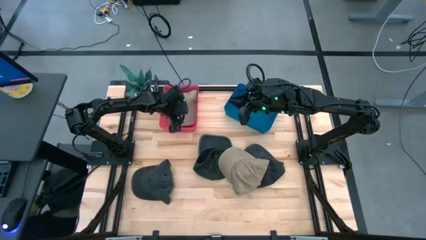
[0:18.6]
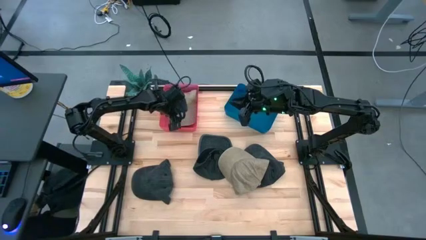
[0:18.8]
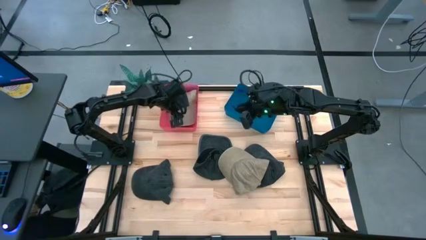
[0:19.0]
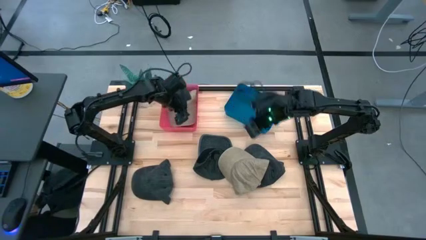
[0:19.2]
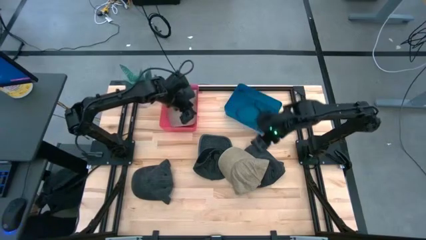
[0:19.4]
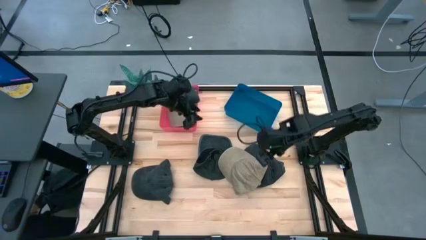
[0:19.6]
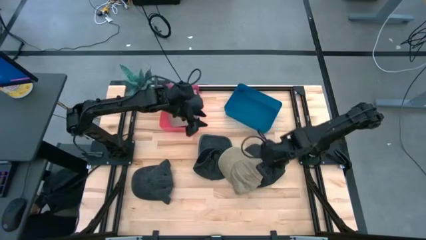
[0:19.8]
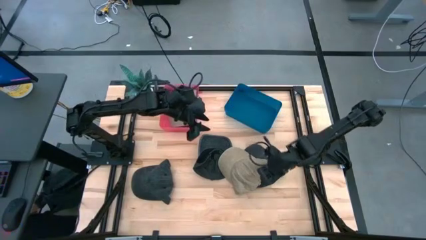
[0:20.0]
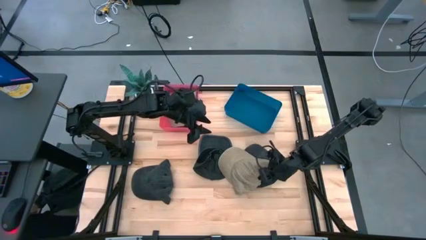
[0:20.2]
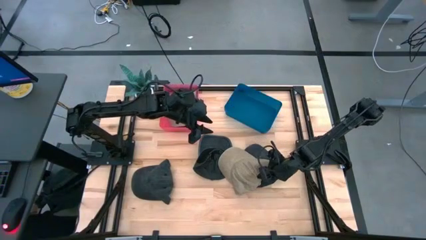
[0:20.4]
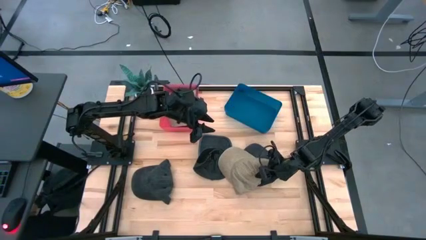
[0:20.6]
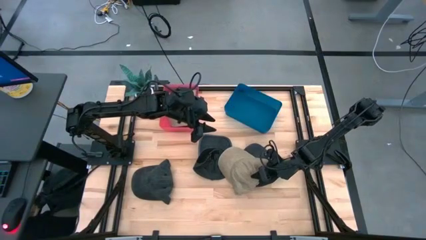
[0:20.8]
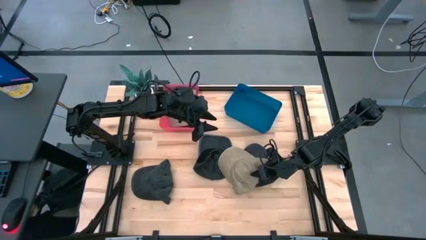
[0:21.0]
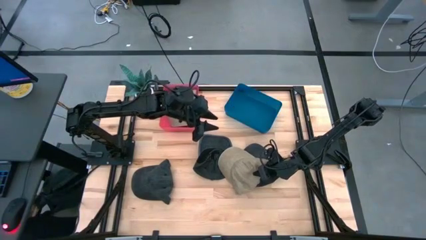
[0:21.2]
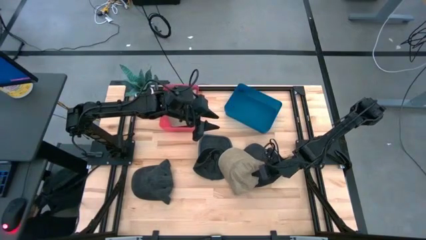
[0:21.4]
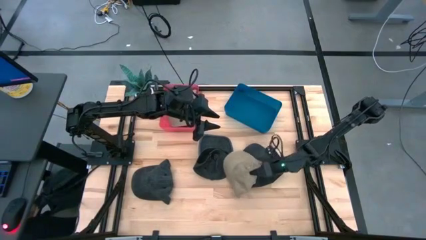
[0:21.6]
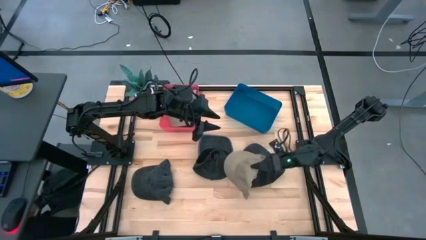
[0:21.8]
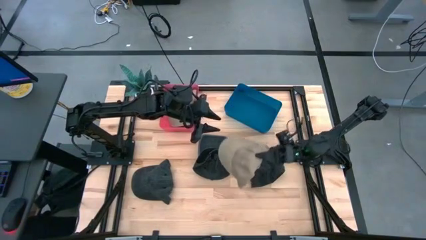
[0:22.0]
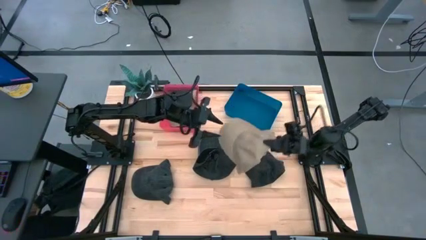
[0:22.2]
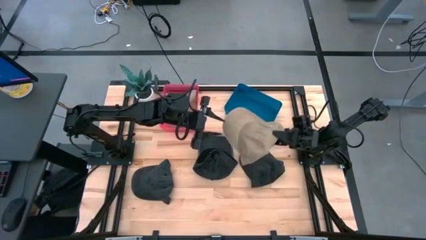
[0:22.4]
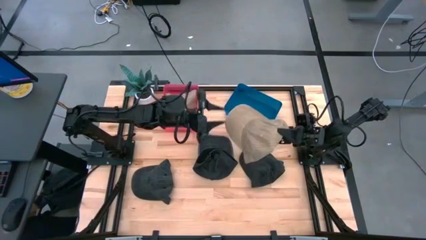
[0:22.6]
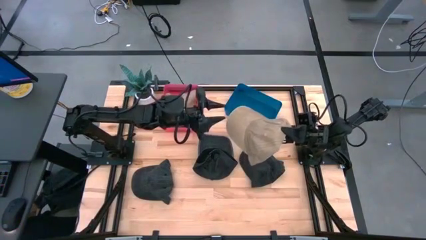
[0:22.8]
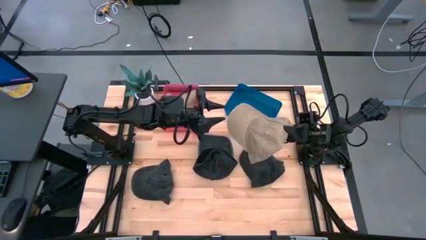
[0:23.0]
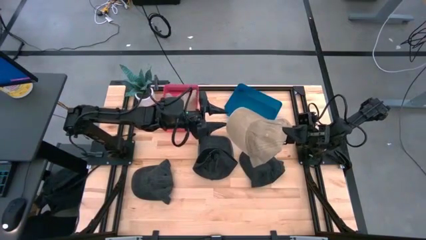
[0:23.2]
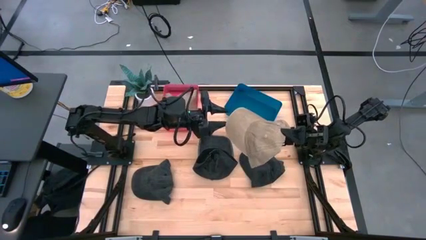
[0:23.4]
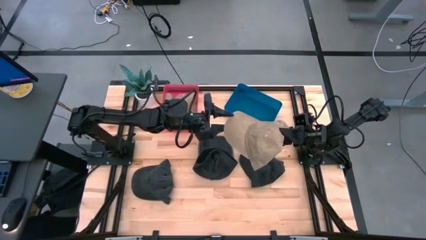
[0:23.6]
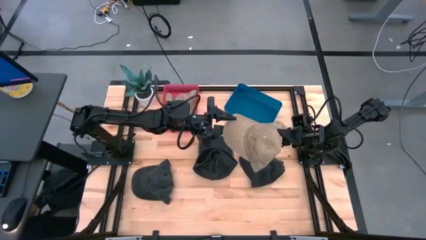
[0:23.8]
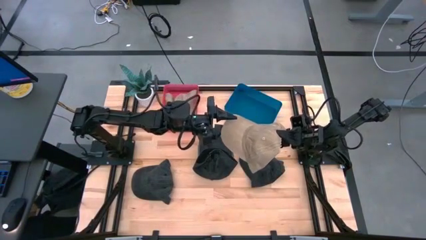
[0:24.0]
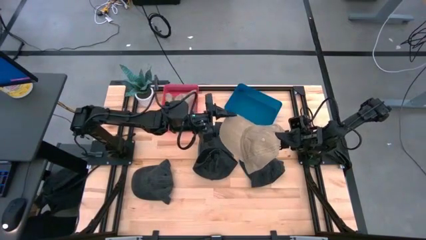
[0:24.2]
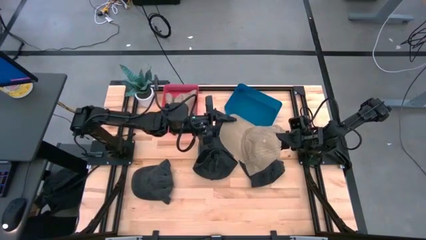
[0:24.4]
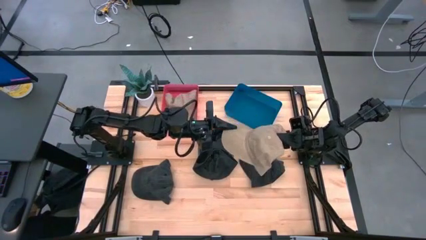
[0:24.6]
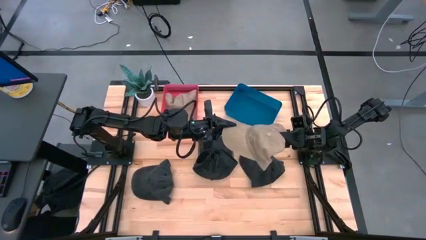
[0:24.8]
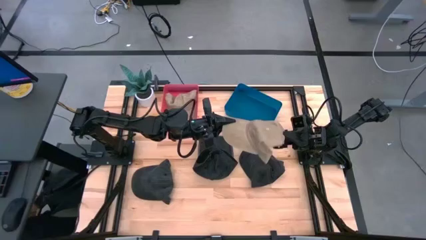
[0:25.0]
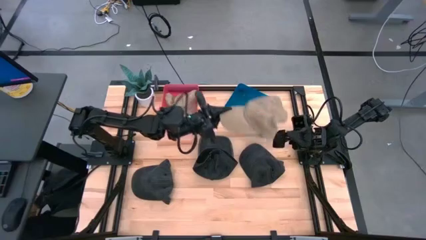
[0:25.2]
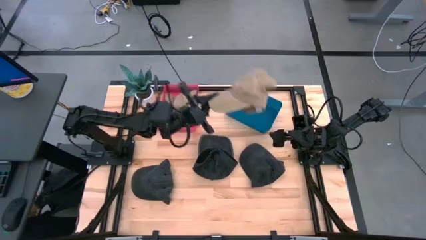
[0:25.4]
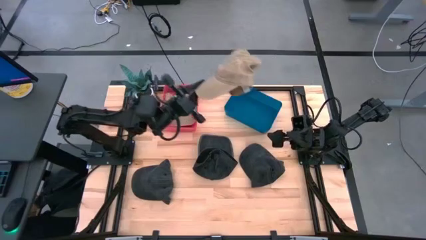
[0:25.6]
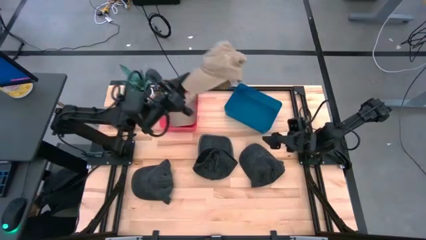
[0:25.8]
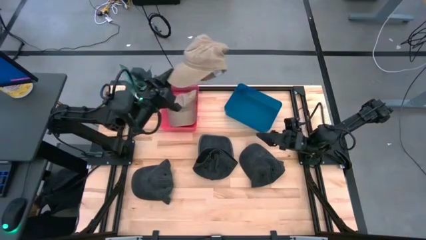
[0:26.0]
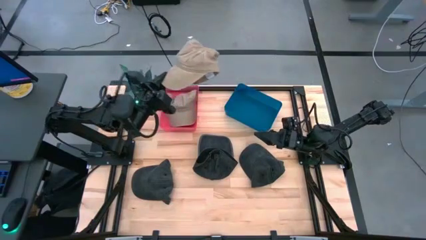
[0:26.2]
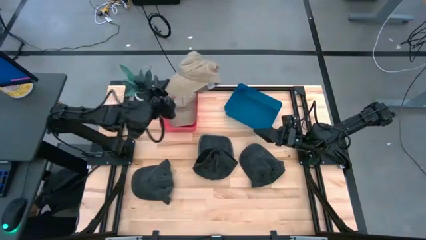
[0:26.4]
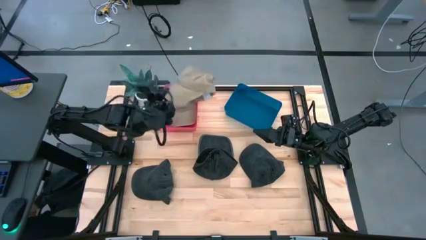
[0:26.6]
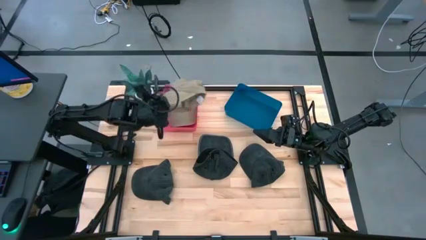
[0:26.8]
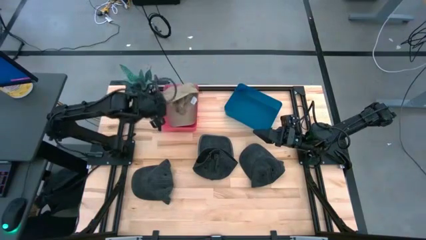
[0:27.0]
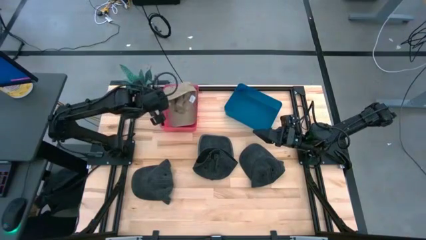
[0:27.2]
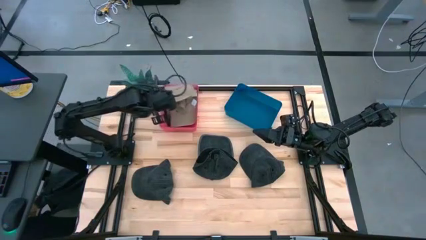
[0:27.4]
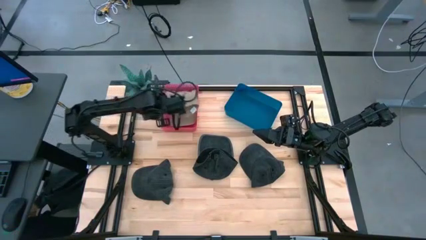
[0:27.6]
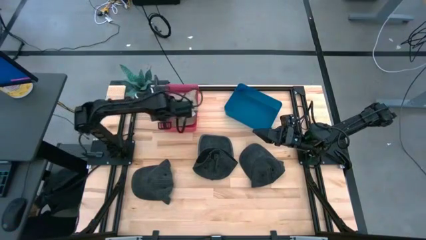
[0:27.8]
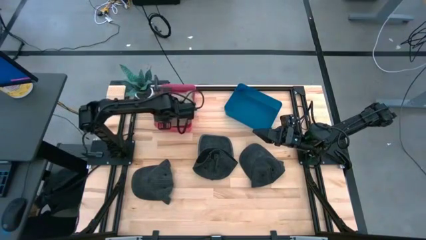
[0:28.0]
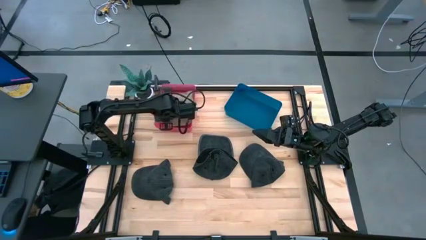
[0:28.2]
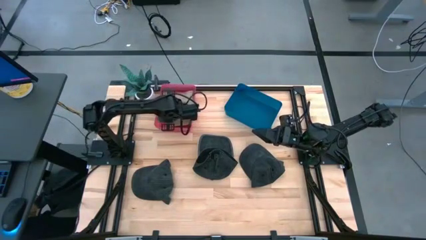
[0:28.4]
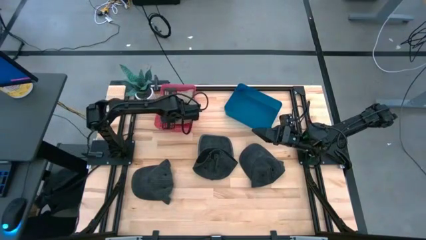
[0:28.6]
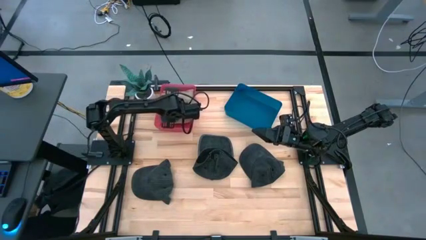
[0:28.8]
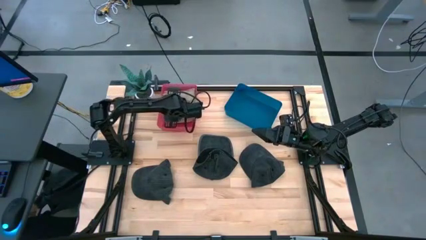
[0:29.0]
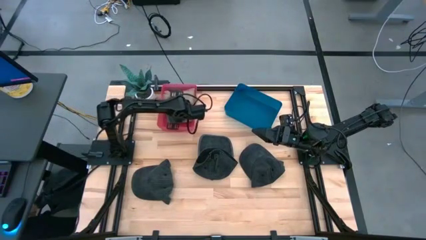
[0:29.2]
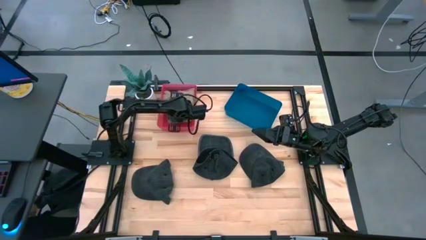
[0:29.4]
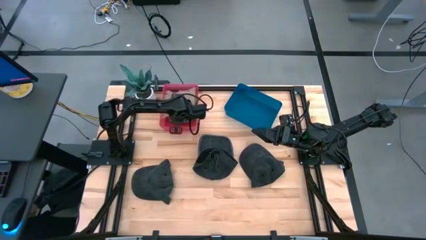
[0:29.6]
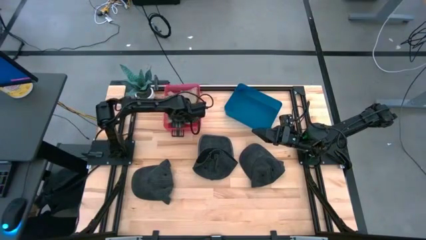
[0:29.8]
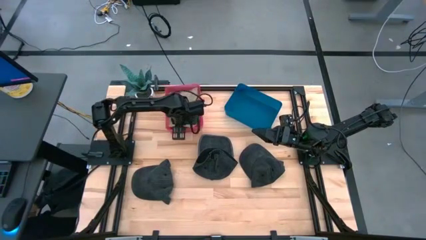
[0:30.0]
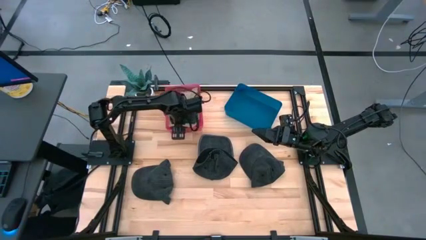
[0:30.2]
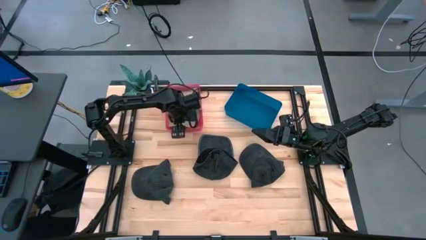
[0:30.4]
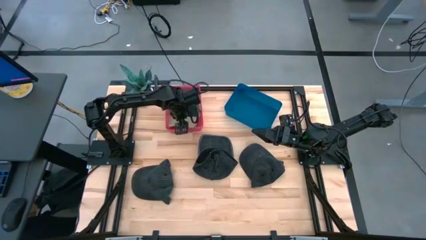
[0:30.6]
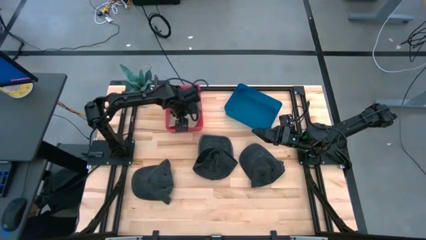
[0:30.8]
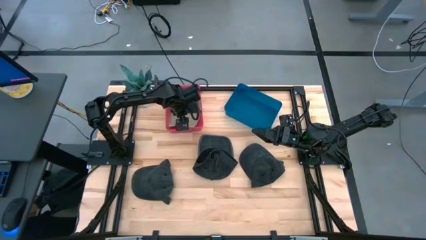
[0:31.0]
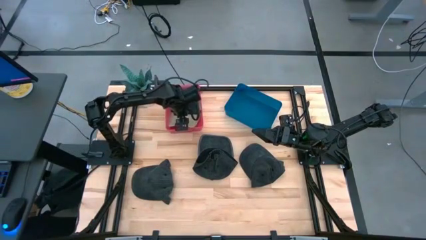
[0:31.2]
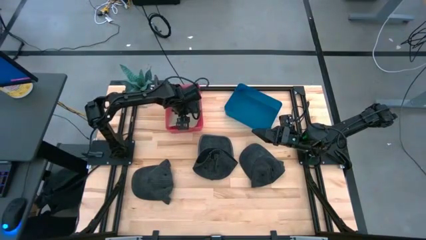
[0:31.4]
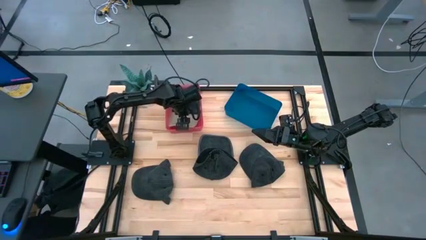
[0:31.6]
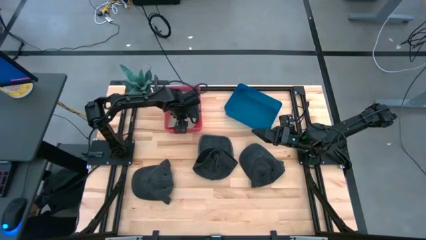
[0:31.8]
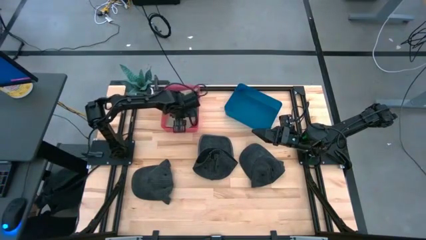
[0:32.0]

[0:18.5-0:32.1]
Task: Pick & Place hat
Put the brown cap into the red bin

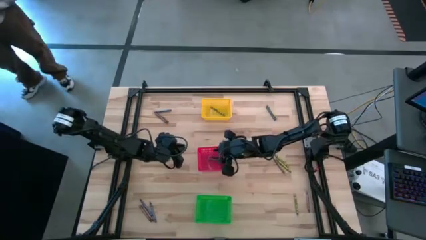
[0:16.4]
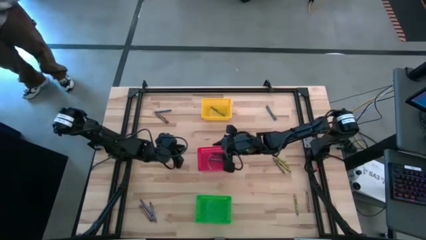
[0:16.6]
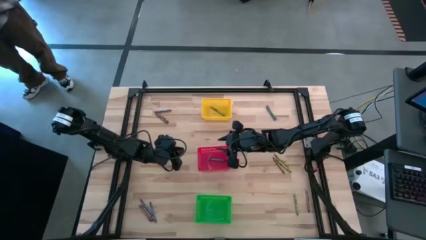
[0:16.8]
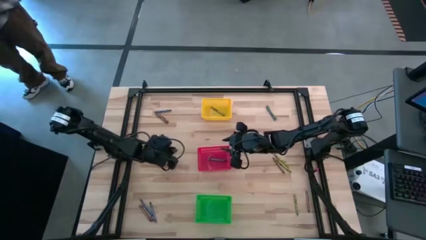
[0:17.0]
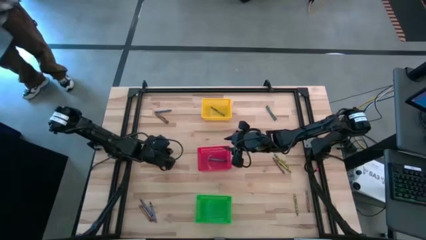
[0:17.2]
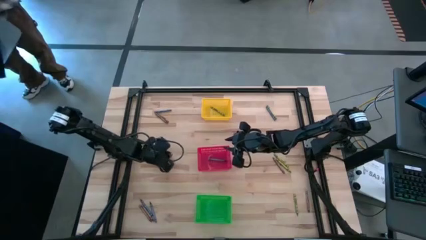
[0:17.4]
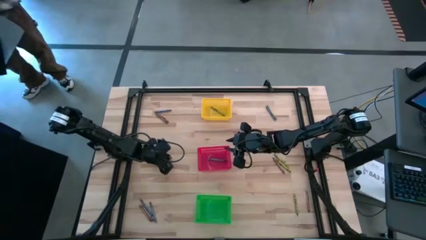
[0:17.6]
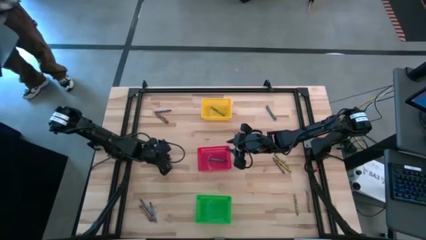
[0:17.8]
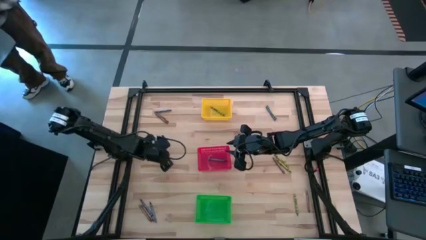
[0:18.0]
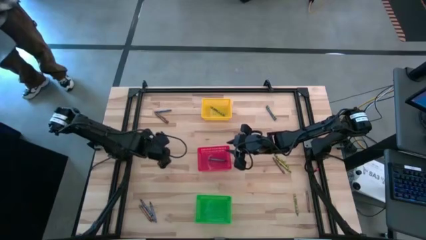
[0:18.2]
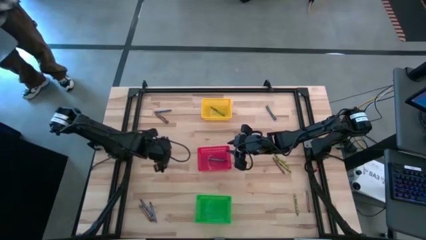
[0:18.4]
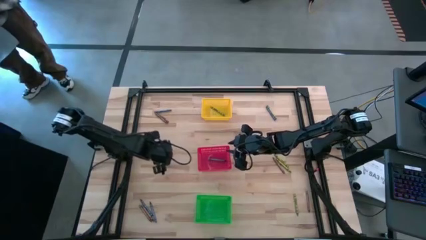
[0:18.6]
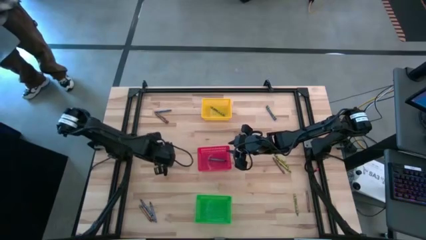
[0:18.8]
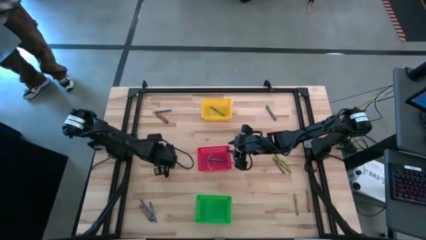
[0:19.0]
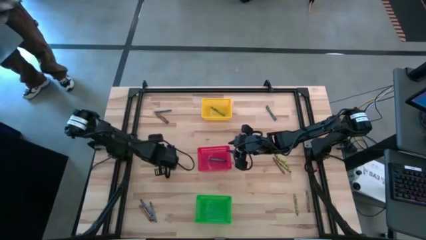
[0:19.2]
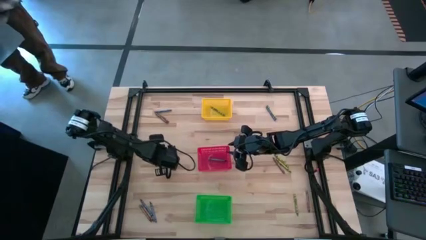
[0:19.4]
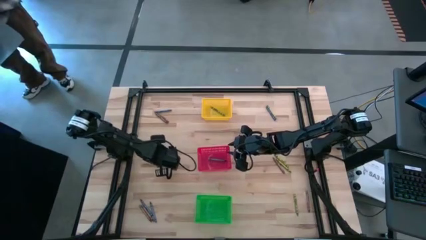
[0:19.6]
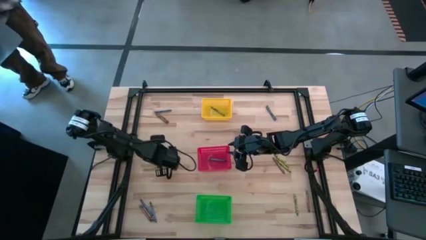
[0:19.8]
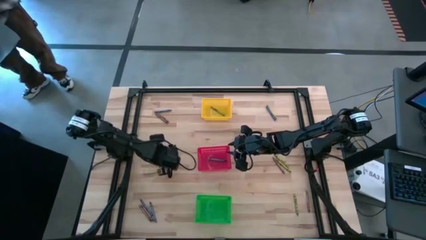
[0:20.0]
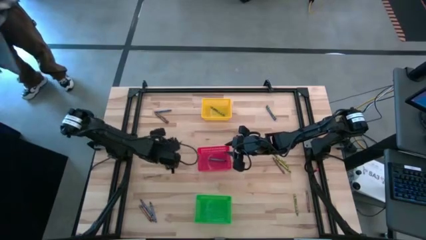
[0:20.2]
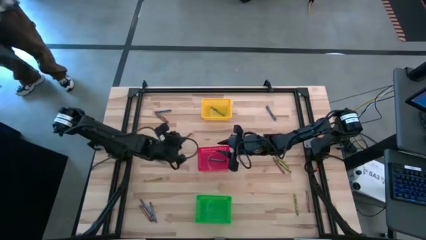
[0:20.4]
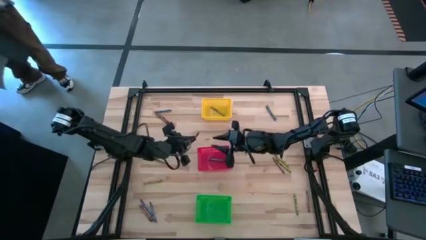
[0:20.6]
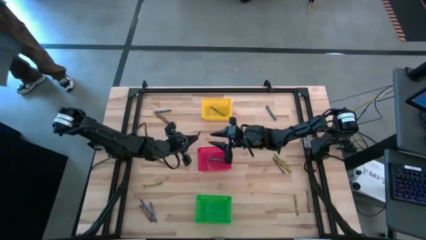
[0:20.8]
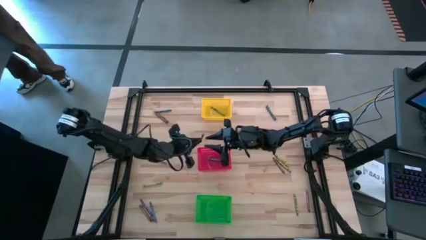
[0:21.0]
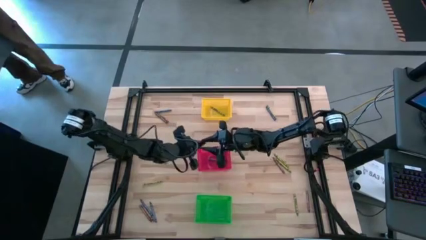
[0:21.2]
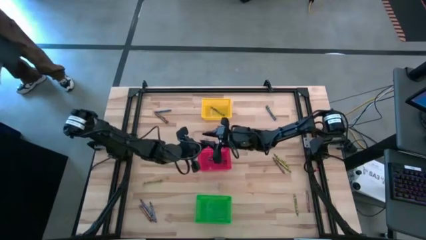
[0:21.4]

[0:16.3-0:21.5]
Task: Sort crayons
Put the brown crayon into the red bin
